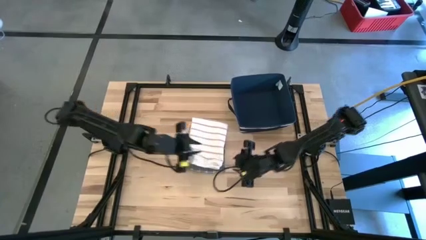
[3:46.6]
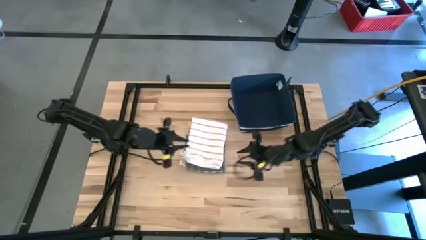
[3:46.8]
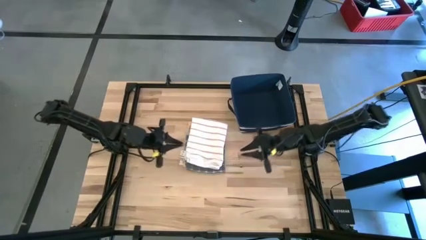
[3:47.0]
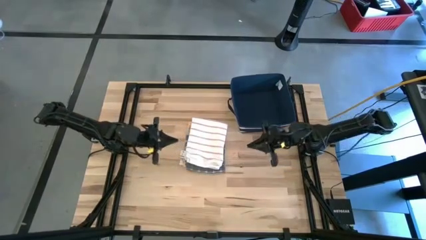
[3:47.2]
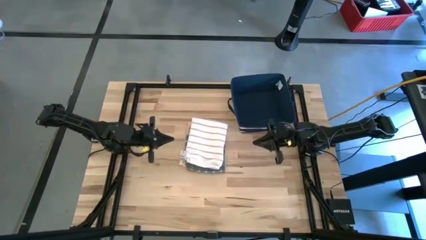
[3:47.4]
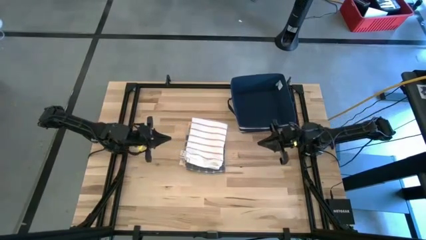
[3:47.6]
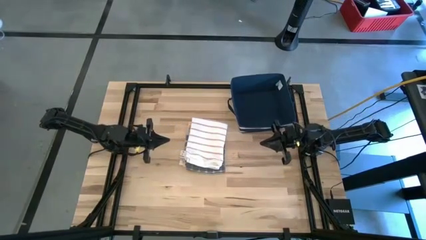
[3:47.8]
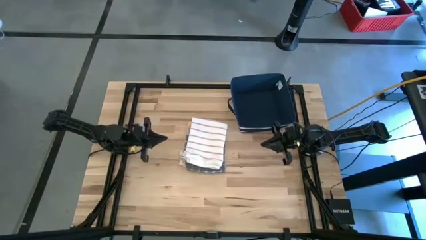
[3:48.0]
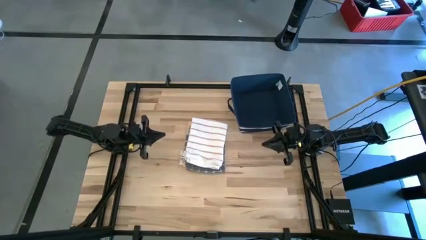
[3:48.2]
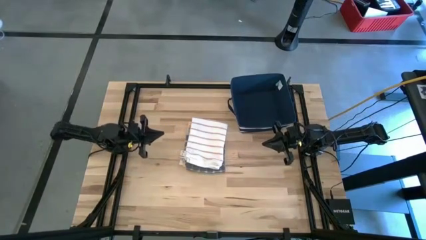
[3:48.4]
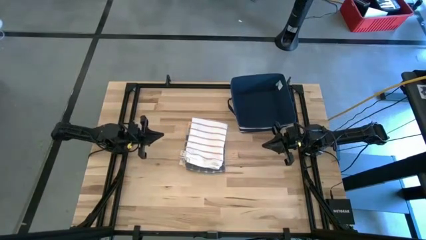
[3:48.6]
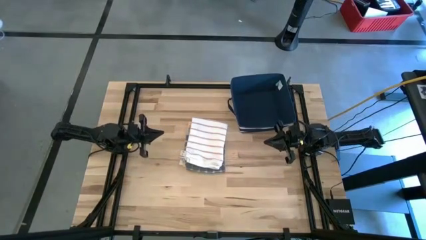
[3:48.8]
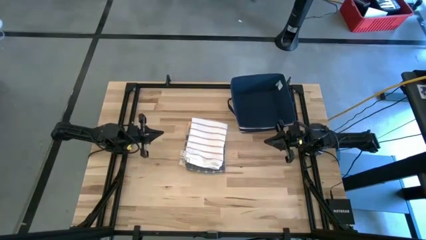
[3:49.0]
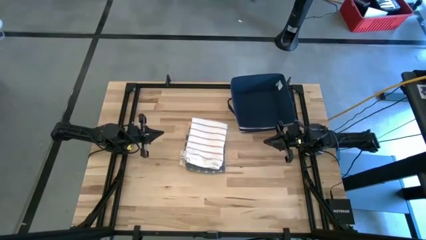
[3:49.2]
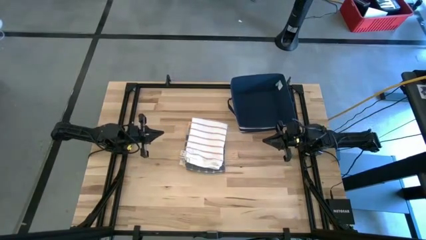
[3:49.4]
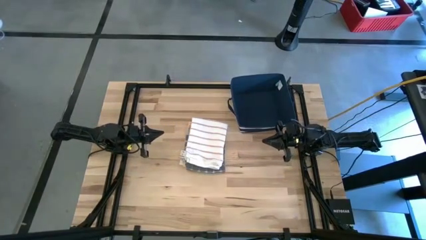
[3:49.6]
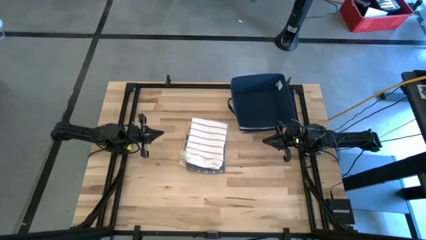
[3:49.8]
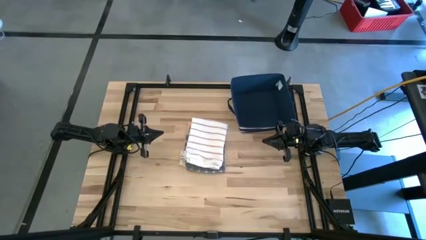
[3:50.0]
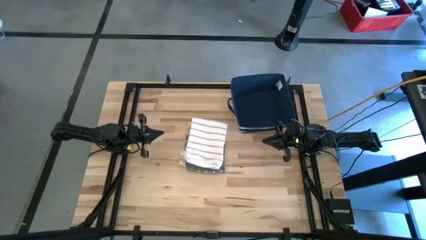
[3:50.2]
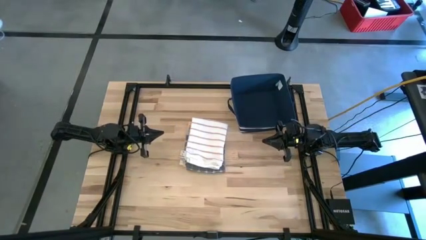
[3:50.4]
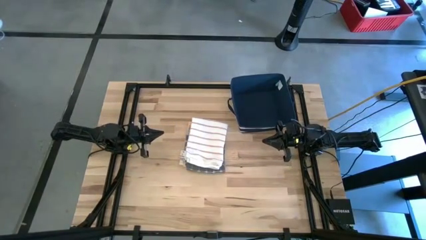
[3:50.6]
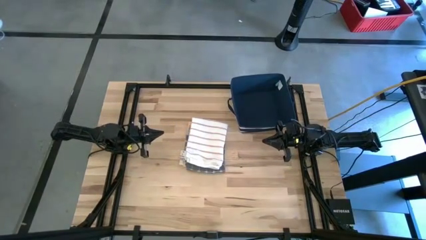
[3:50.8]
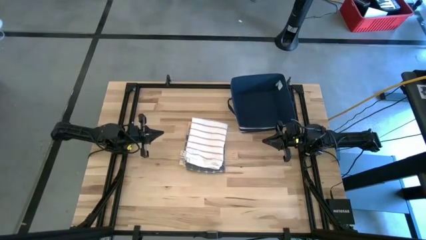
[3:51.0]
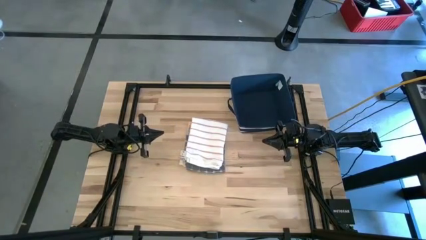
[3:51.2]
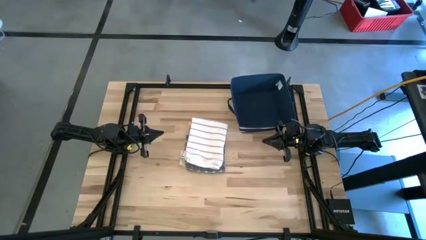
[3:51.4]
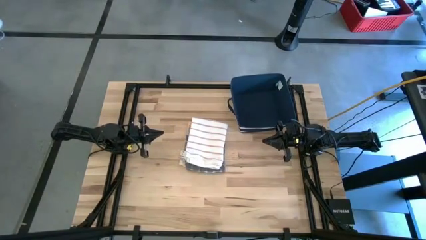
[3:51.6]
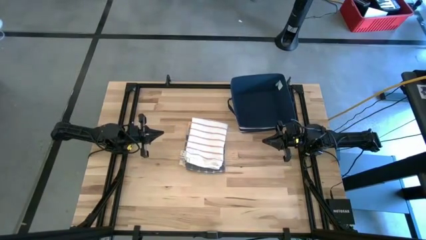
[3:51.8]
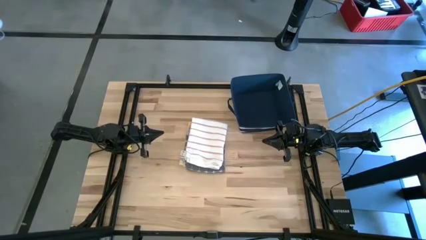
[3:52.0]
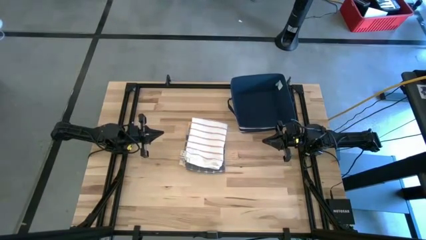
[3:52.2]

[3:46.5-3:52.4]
Task: Fold towel
Return to Home Position

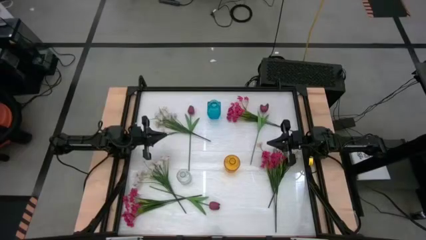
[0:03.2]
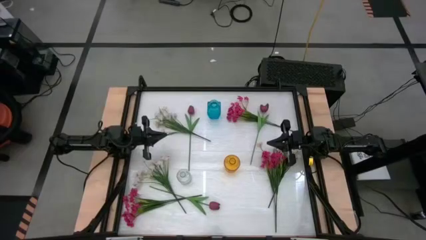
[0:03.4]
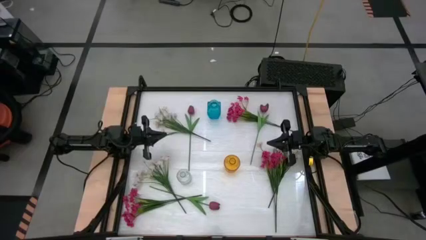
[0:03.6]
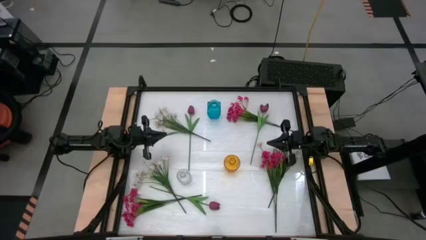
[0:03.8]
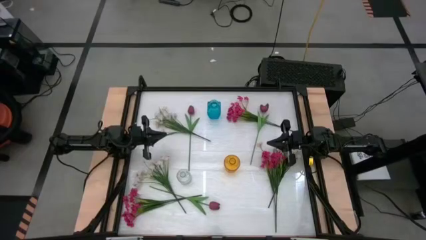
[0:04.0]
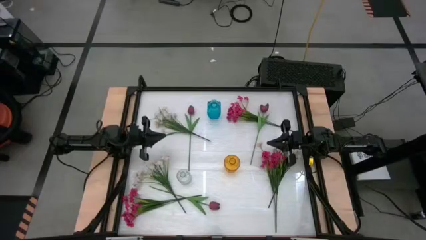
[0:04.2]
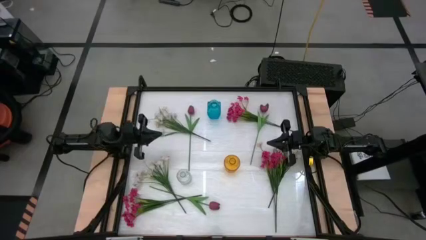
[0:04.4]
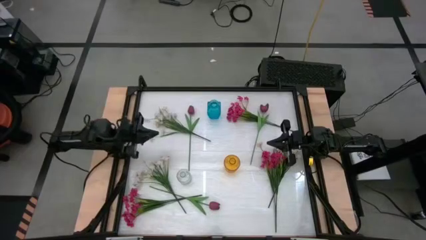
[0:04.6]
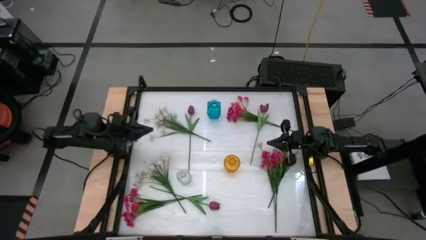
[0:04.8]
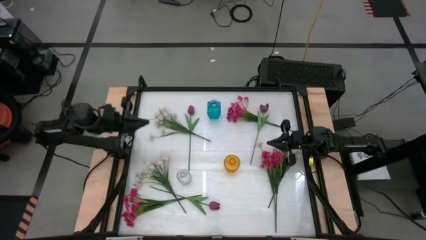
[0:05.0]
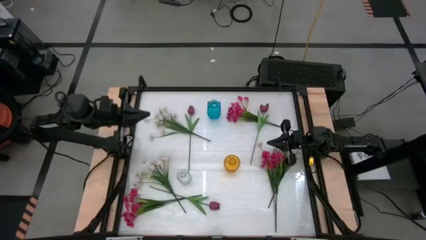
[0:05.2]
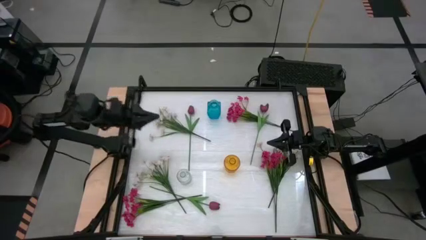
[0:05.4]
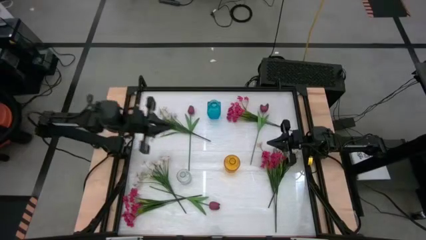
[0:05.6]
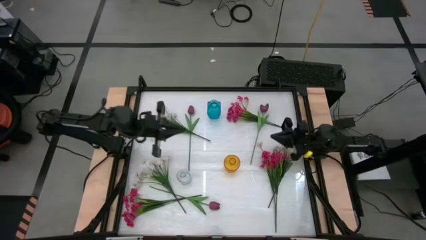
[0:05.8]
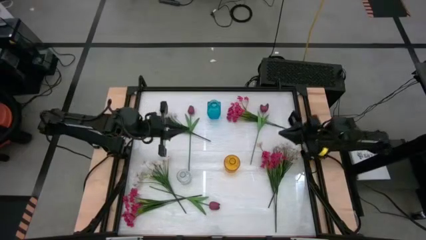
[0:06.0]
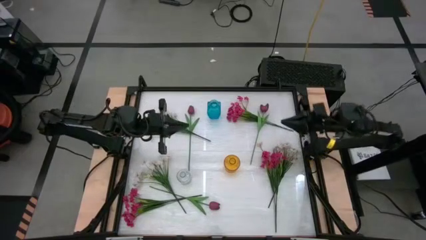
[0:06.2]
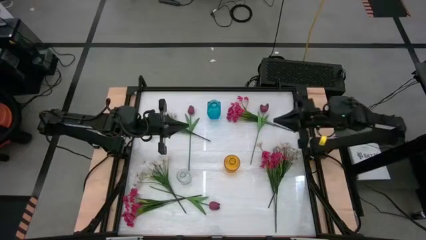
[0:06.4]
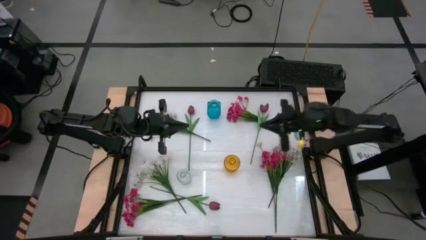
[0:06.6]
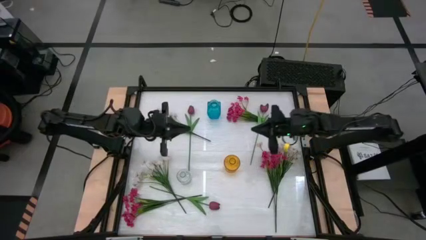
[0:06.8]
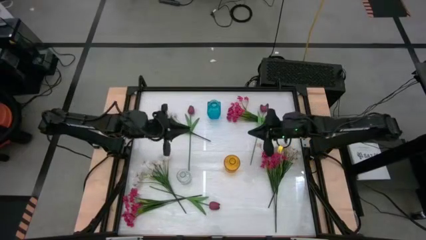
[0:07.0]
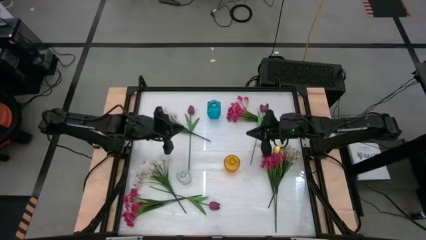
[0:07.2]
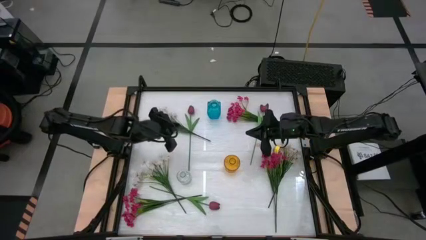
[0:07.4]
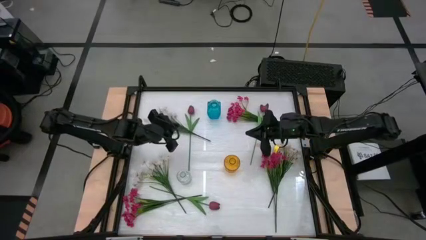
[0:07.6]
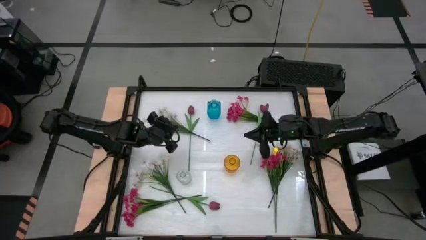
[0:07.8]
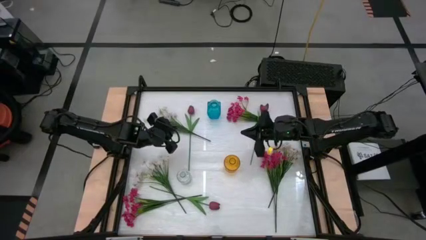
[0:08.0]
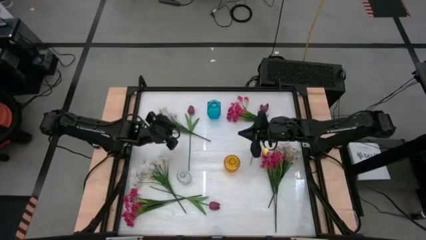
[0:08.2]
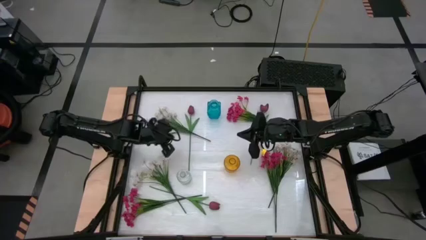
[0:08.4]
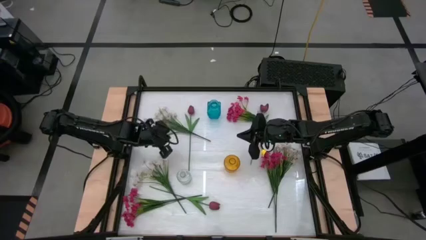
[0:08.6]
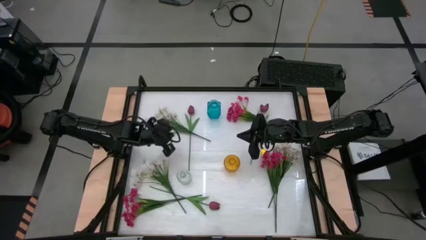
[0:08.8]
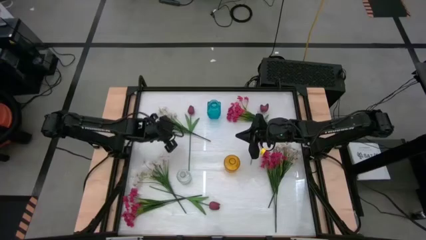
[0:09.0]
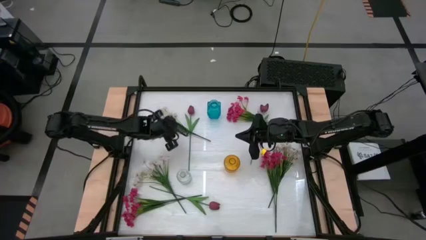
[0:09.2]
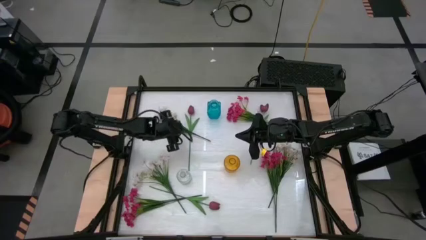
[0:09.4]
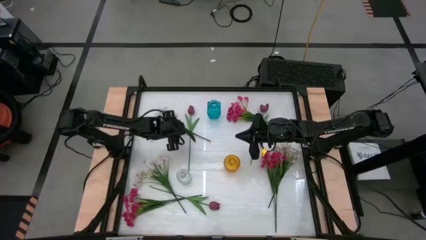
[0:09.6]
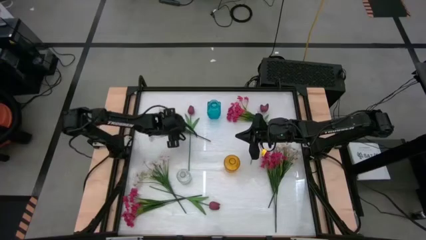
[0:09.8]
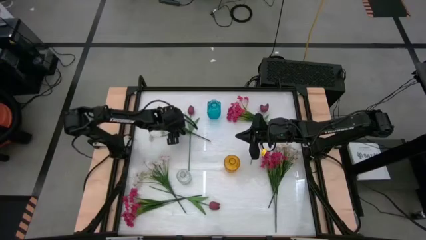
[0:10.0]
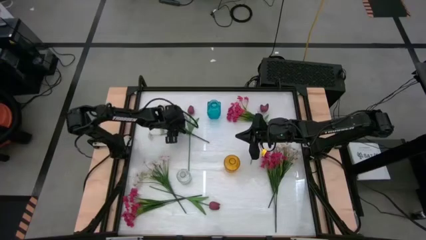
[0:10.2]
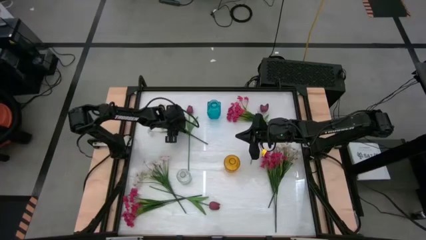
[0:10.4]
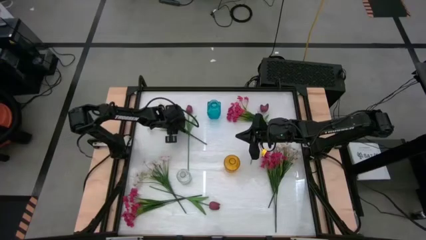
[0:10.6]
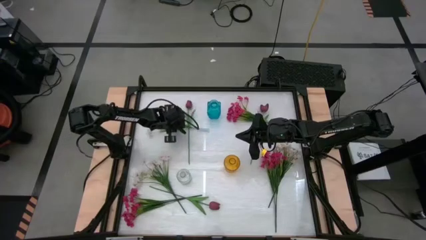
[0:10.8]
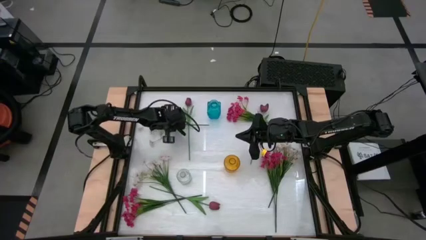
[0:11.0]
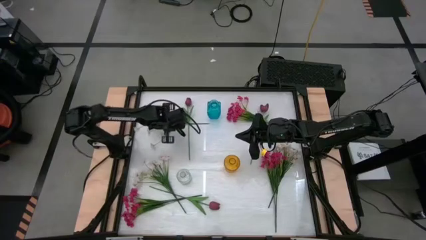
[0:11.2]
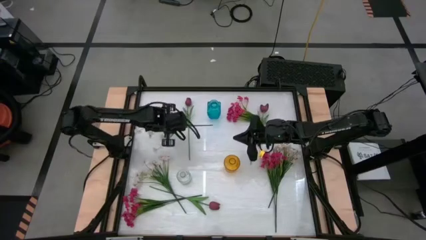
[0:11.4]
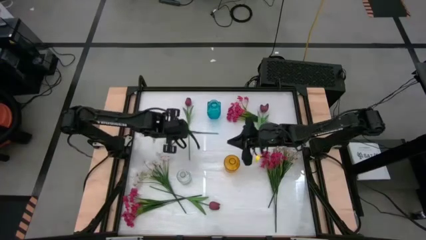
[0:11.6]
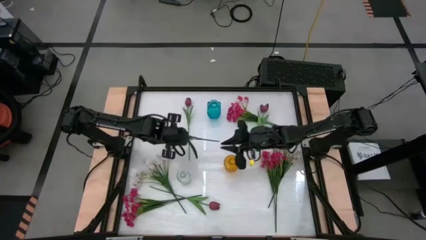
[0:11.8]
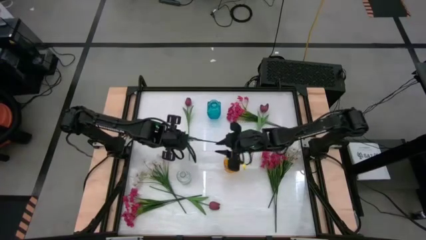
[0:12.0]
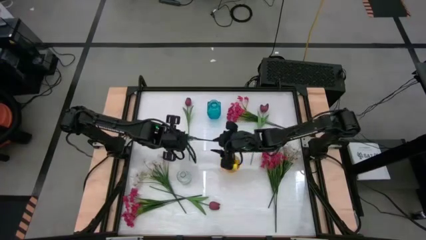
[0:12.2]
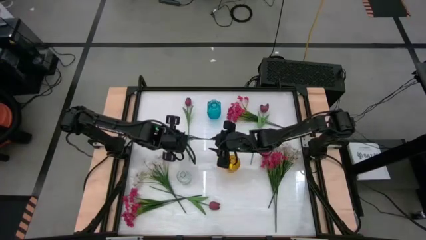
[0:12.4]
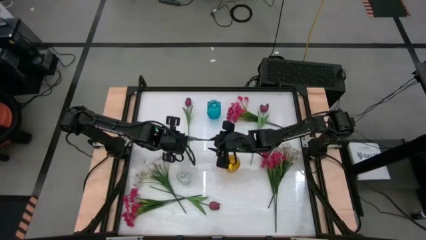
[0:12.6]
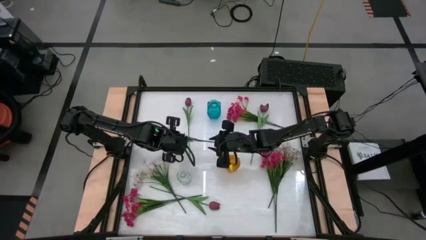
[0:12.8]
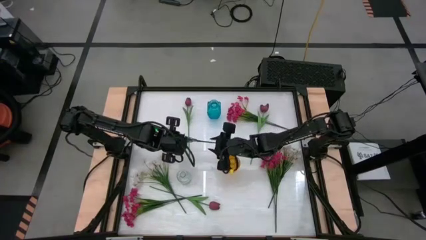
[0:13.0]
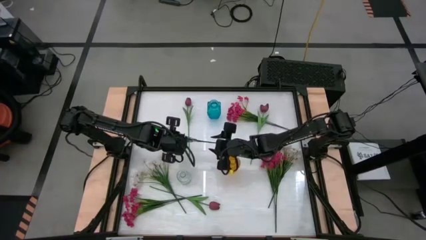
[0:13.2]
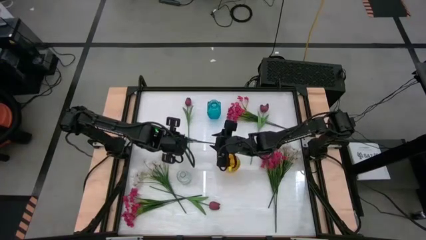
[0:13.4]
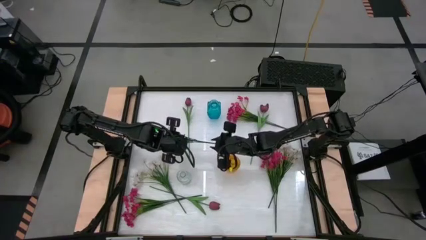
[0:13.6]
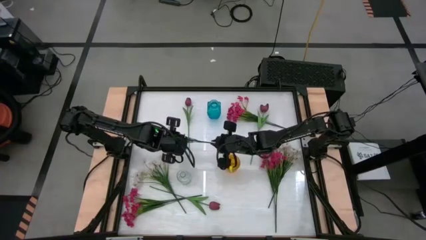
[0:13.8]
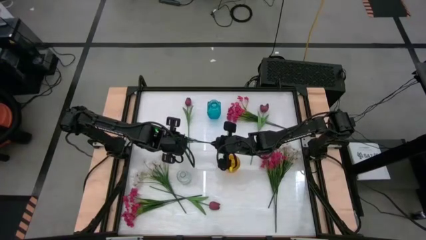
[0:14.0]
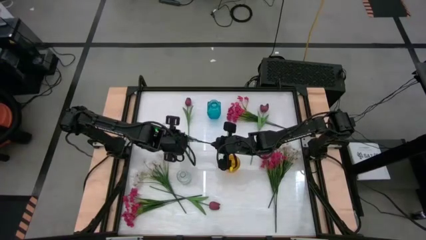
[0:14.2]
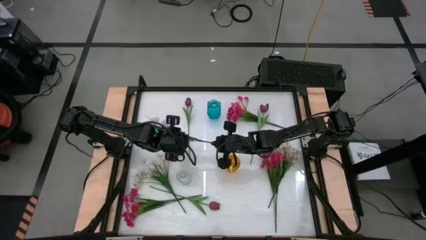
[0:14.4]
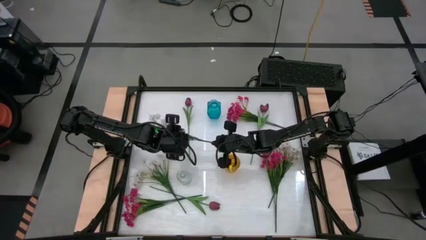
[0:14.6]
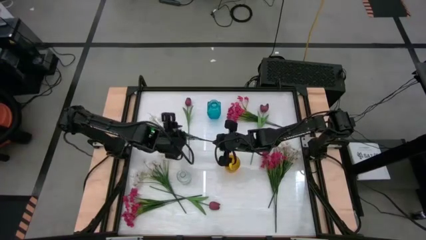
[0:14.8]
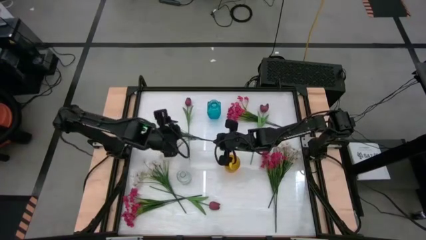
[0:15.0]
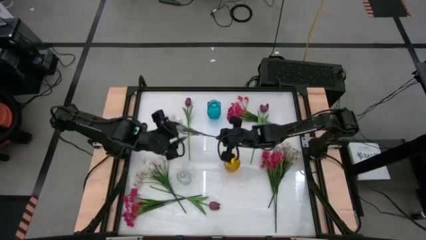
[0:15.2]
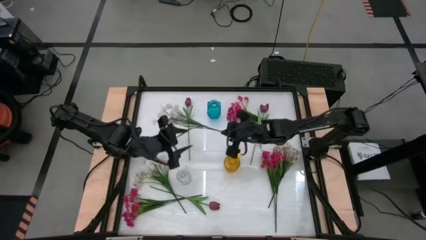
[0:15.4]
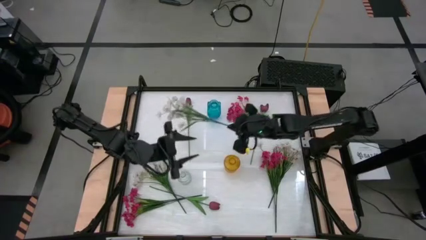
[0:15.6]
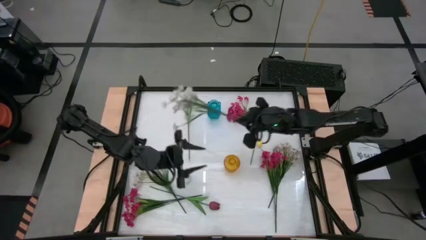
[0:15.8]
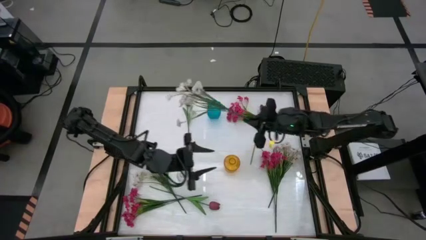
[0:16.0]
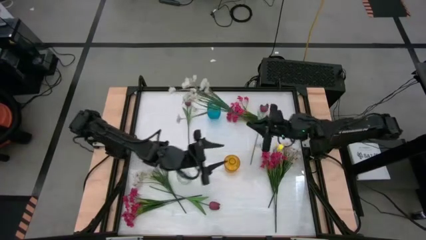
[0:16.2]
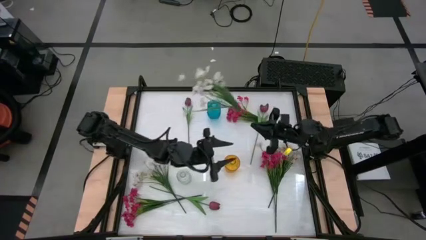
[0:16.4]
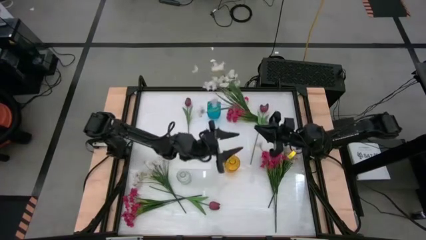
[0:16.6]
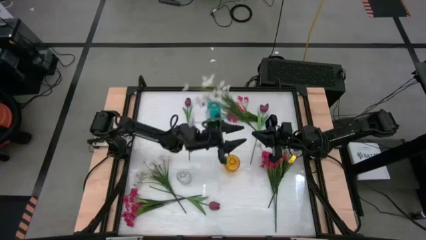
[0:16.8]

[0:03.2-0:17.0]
Task: Sort flowers into vase by color
Put the top white flowers into the blue vase
